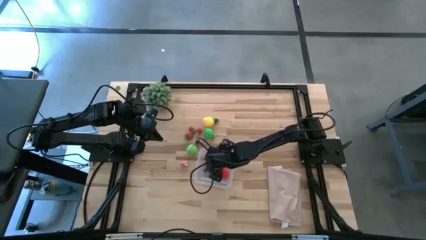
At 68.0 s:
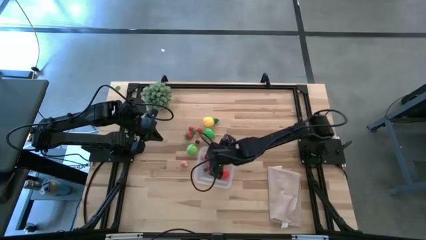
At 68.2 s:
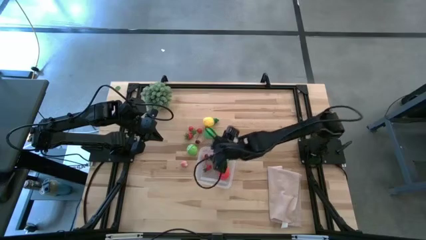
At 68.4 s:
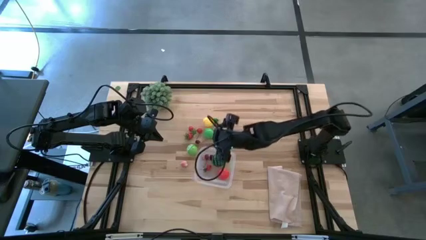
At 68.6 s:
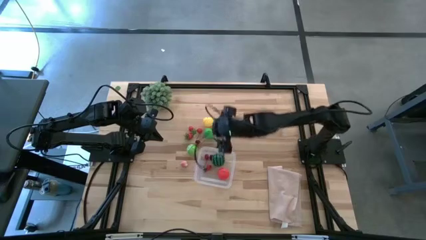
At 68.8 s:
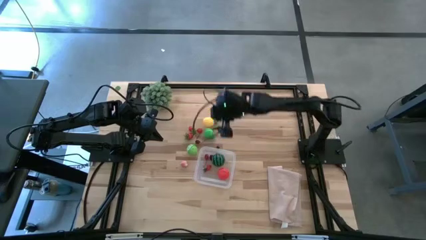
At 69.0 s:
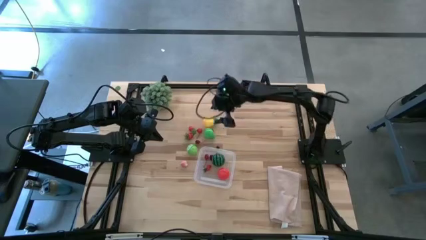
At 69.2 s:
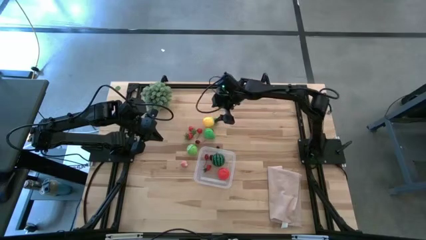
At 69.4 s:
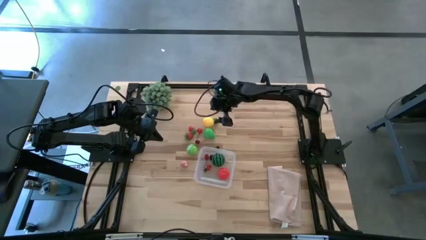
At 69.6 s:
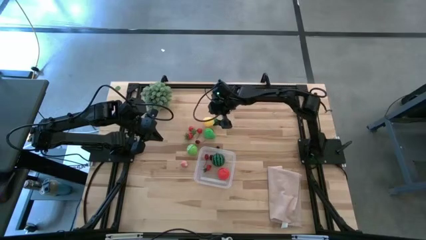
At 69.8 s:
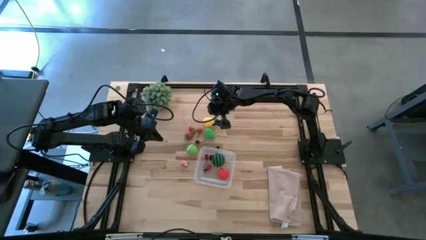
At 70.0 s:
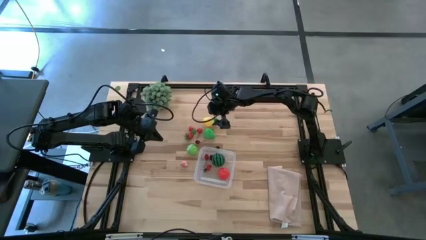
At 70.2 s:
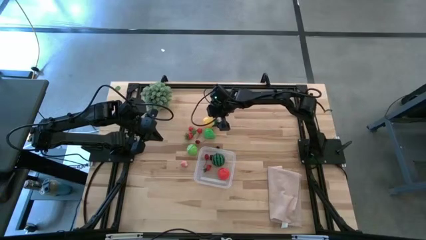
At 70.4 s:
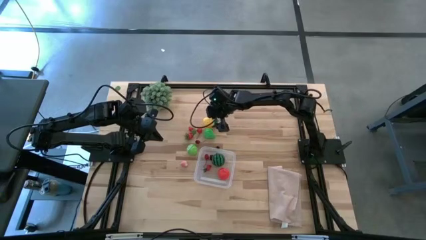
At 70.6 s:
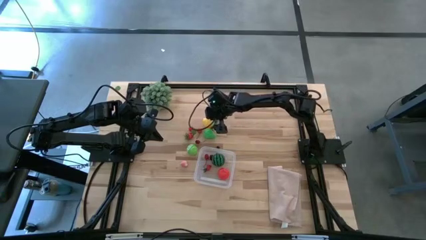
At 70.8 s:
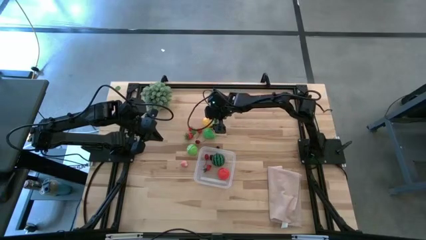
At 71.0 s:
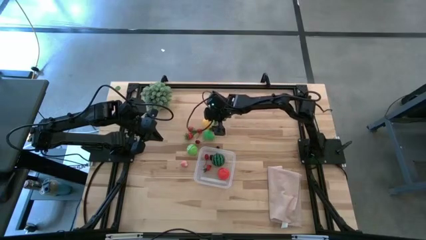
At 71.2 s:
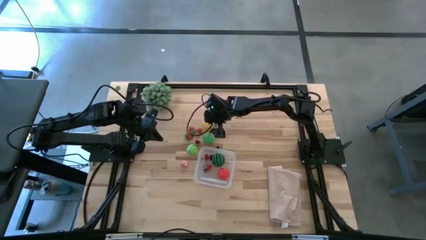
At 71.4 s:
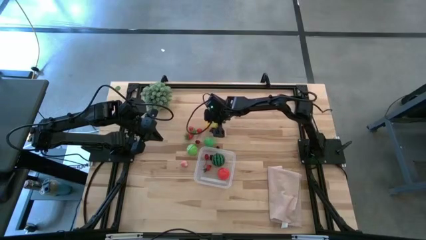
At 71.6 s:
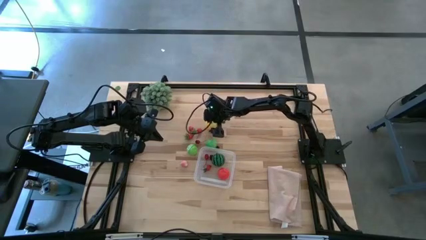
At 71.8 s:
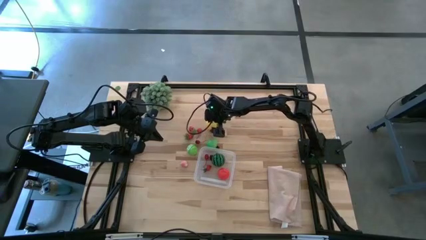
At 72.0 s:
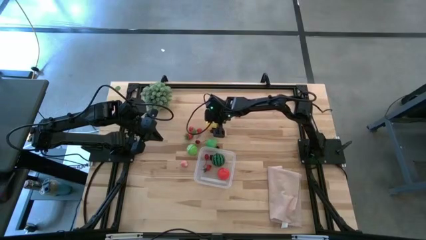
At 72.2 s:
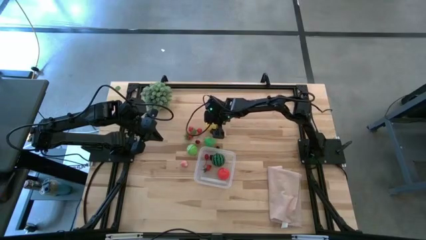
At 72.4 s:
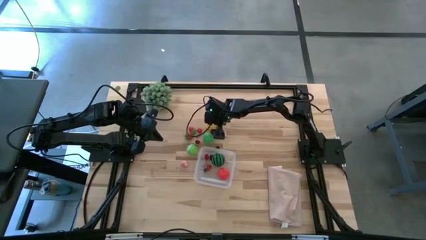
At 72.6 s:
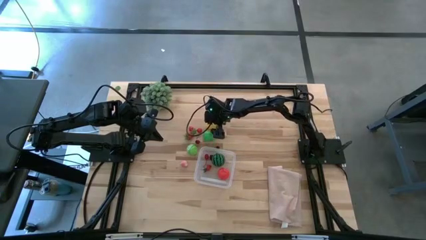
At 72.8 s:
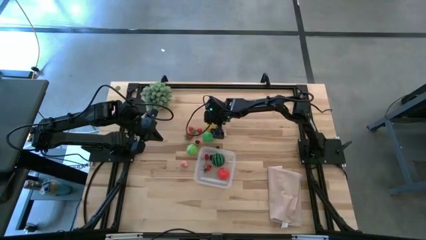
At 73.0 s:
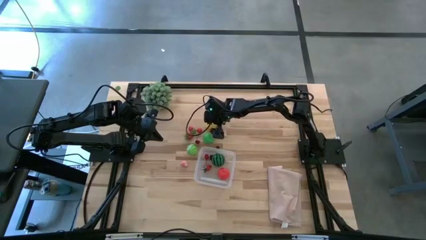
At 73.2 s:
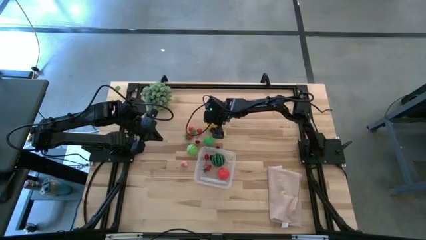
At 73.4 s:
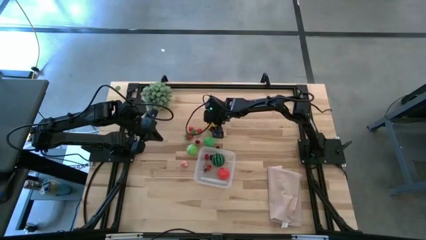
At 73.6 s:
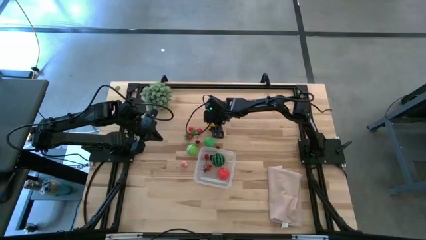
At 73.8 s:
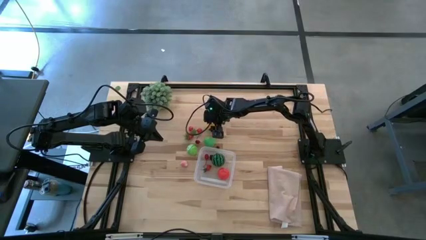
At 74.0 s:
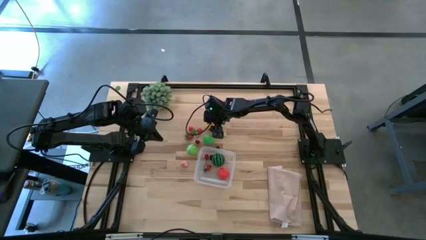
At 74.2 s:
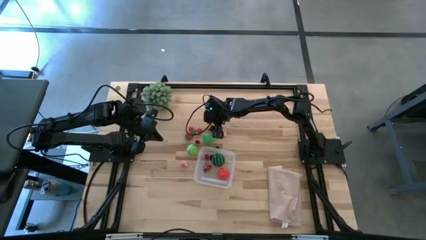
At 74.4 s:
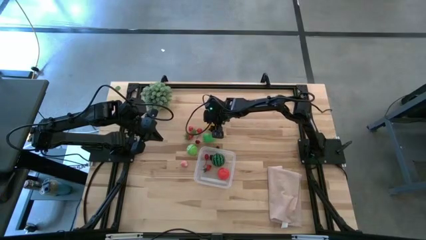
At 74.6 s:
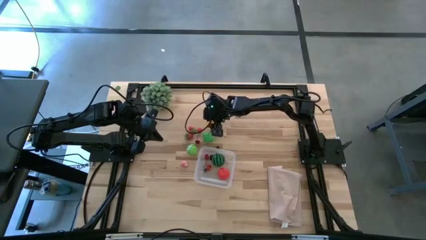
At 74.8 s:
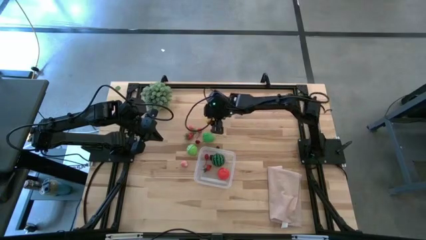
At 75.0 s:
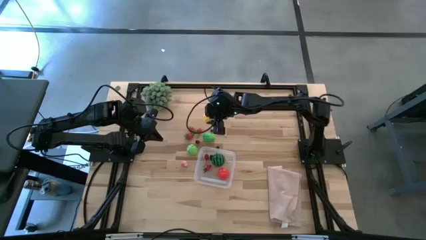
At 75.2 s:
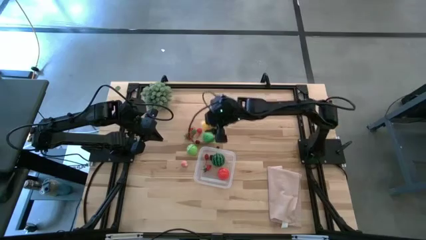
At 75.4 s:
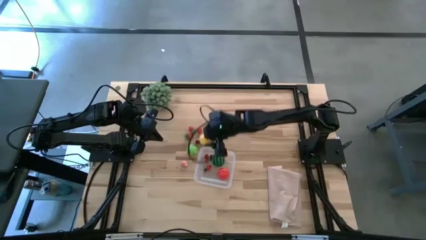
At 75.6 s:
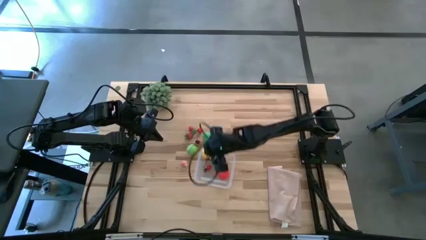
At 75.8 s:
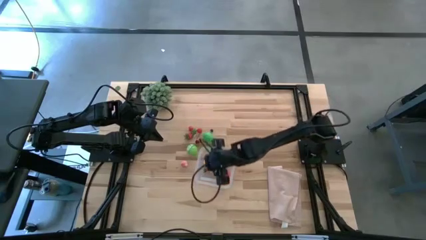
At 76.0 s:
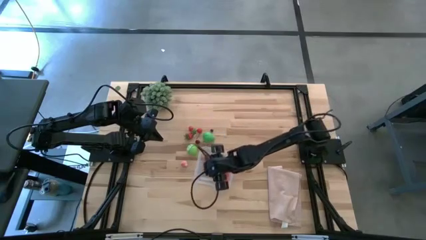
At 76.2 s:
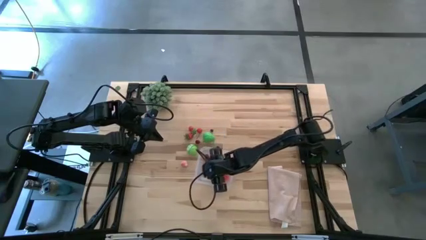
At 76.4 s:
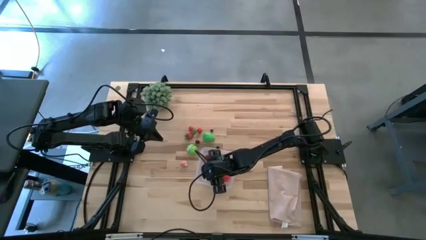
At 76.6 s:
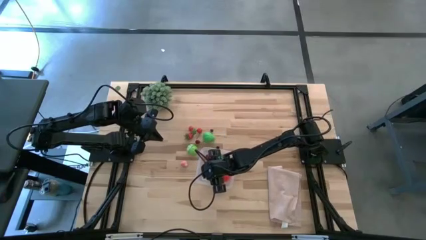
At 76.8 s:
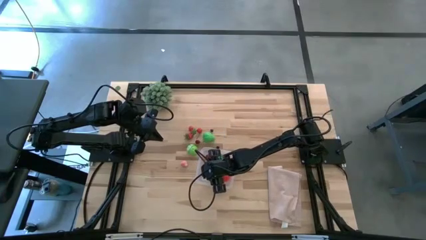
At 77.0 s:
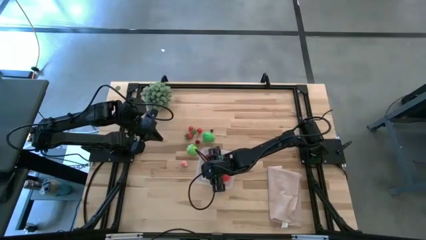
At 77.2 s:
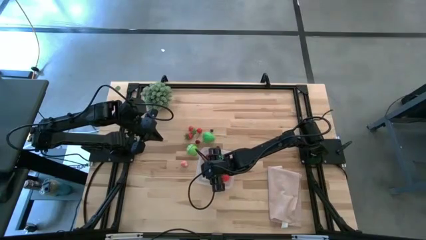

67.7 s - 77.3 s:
Task: Pick and placing Produce into tupperware
Put the yellow pineapple into the transparent bin

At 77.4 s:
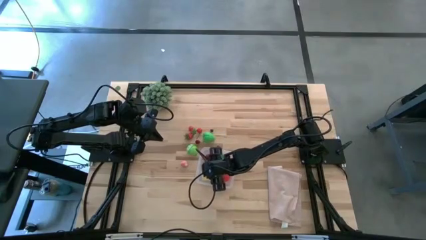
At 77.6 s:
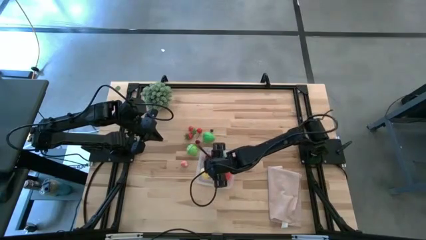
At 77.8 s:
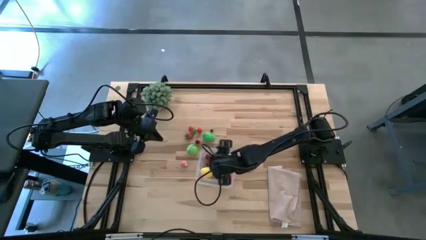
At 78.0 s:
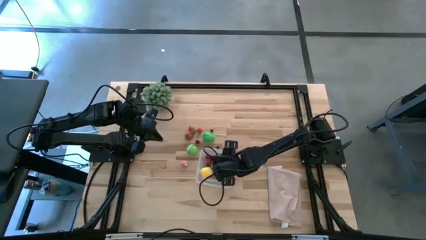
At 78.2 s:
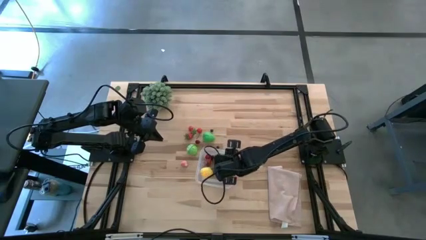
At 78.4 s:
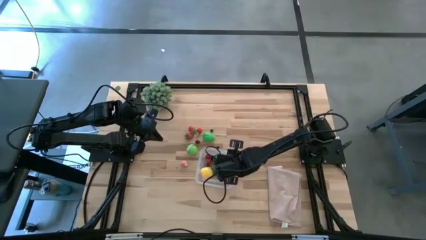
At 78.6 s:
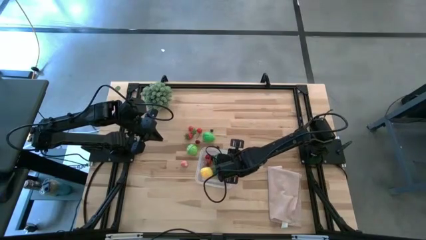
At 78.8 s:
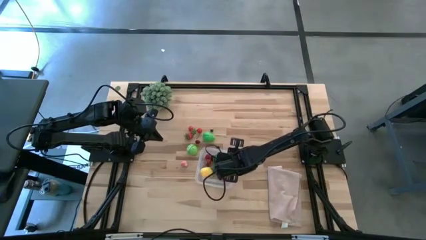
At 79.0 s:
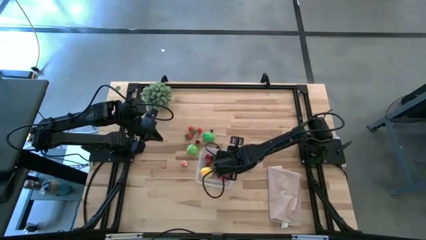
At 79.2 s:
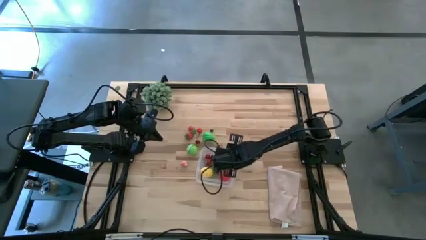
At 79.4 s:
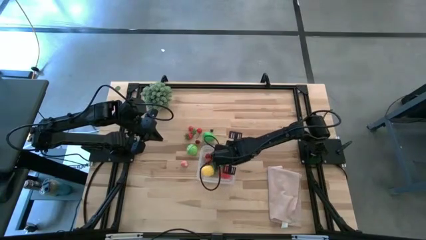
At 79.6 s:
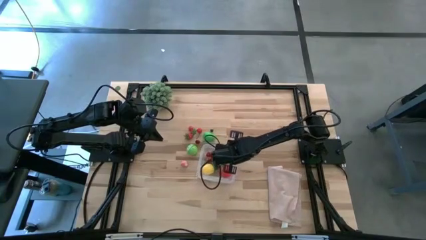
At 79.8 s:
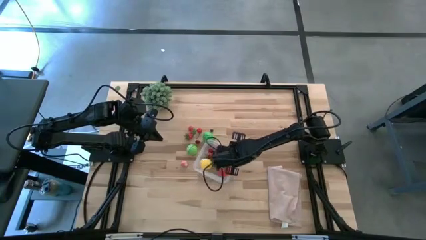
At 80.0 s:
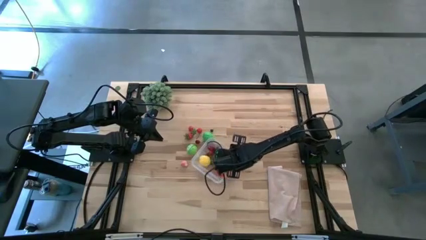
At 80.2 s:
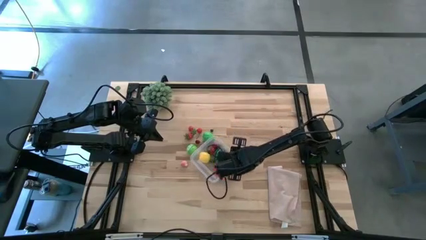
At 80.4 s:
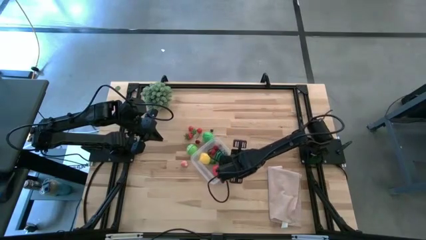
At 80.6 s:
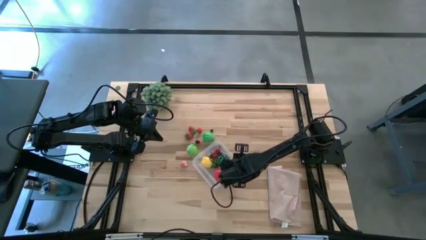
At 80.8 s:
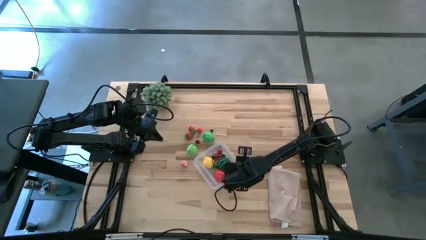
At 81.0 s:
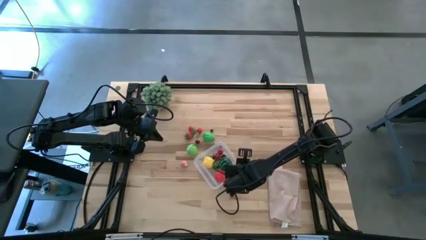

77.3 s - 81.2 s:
Adjust the transparent bin on the table
